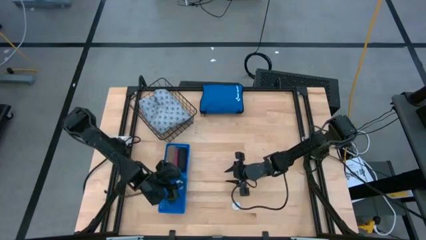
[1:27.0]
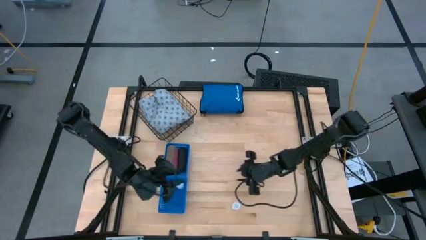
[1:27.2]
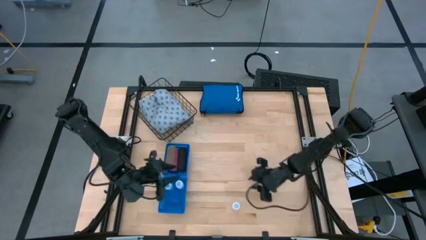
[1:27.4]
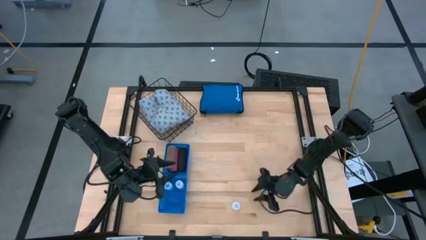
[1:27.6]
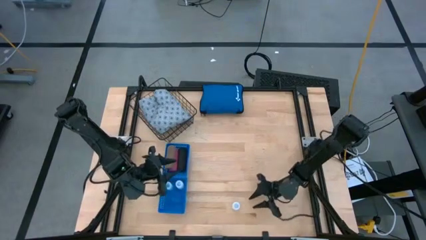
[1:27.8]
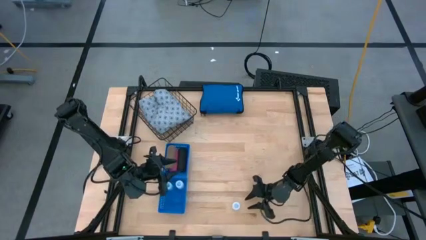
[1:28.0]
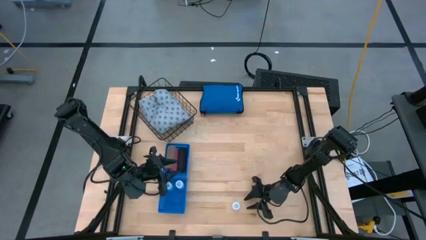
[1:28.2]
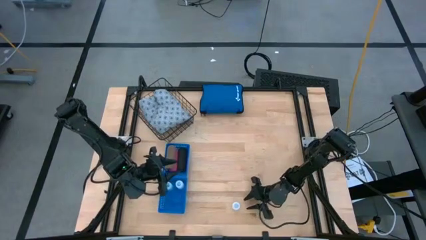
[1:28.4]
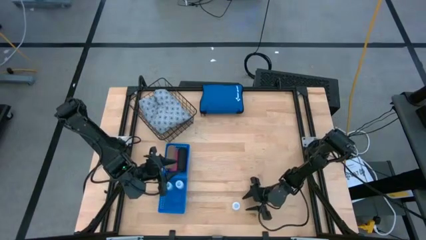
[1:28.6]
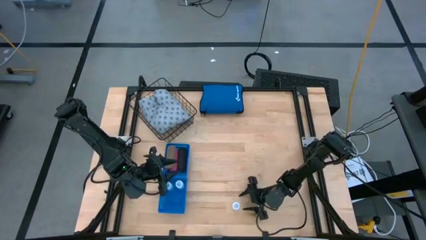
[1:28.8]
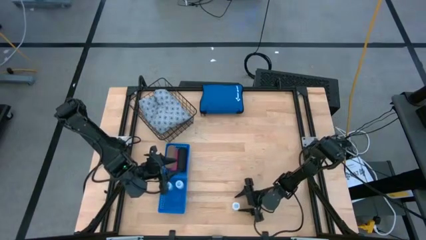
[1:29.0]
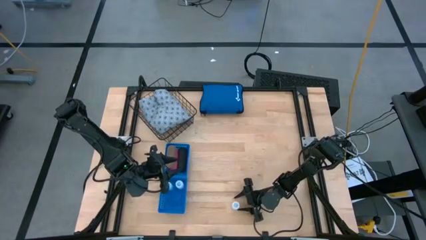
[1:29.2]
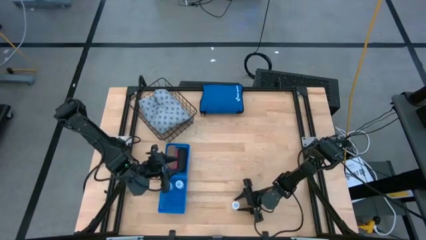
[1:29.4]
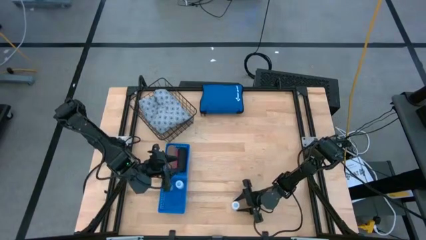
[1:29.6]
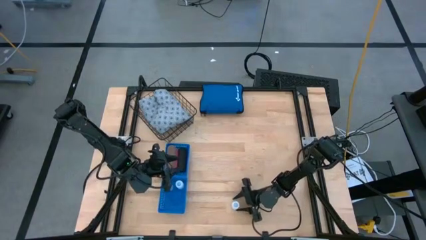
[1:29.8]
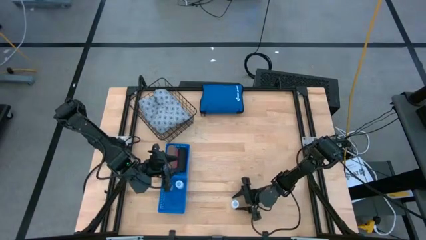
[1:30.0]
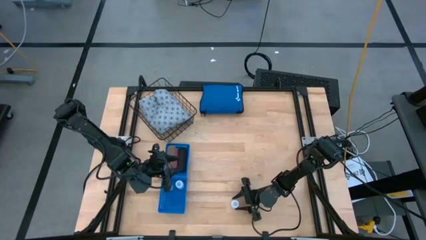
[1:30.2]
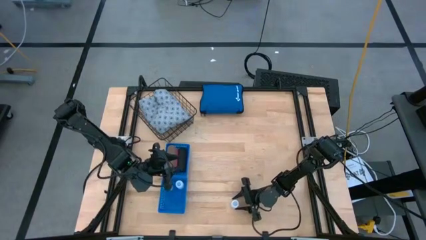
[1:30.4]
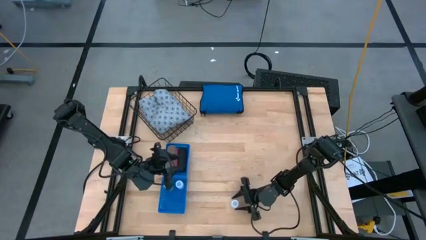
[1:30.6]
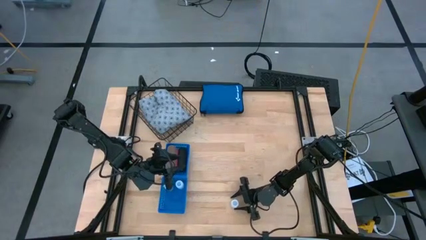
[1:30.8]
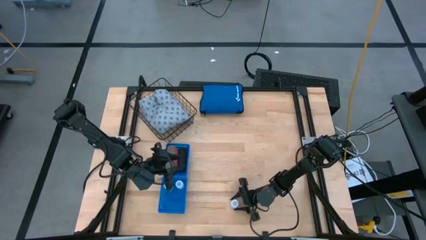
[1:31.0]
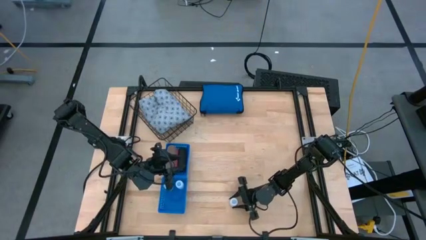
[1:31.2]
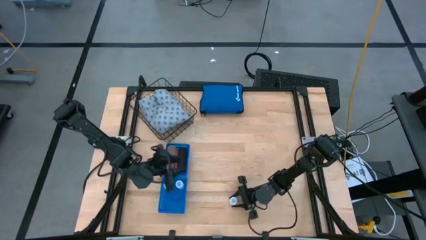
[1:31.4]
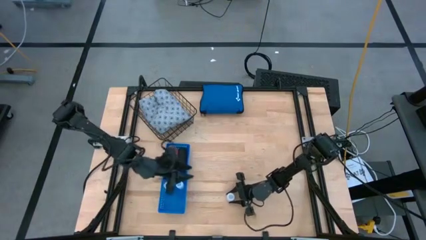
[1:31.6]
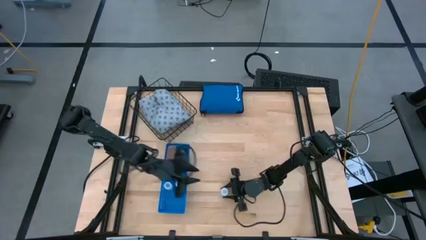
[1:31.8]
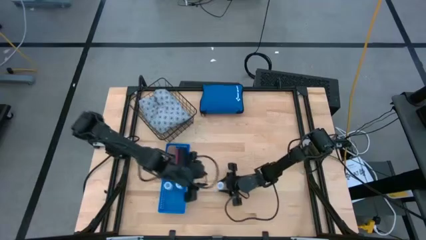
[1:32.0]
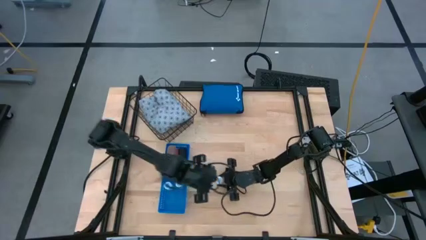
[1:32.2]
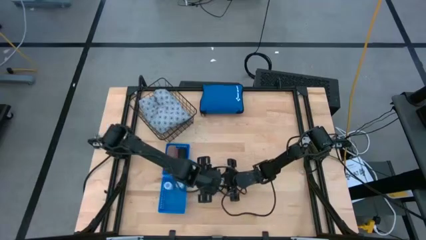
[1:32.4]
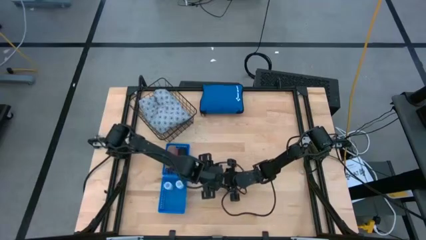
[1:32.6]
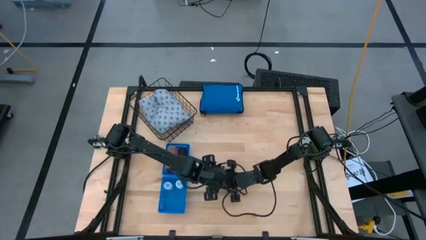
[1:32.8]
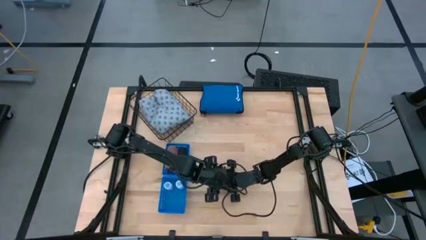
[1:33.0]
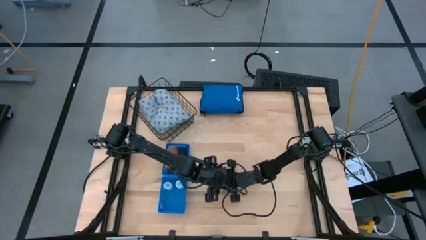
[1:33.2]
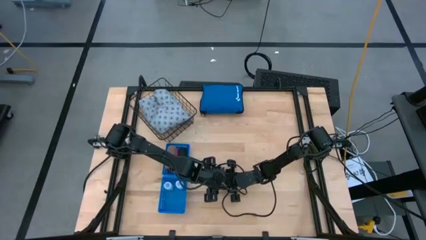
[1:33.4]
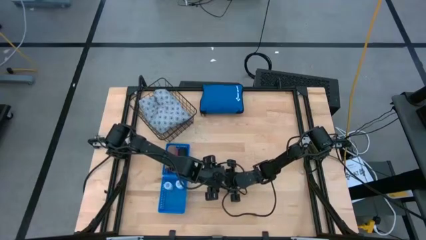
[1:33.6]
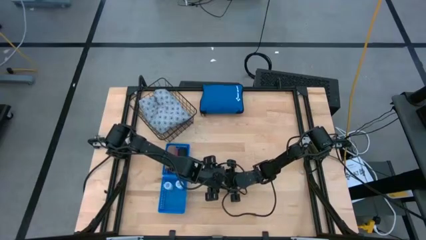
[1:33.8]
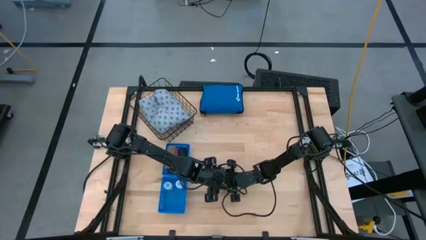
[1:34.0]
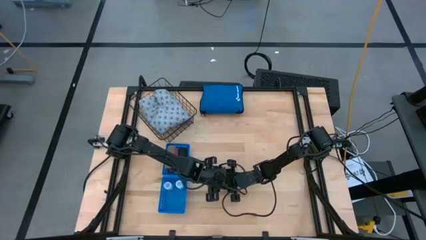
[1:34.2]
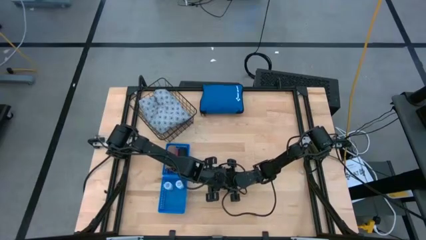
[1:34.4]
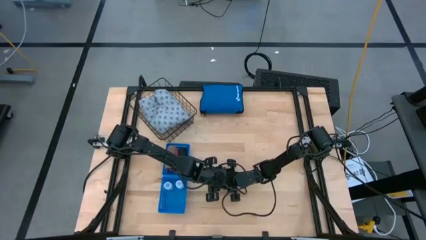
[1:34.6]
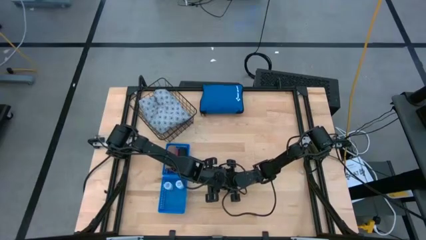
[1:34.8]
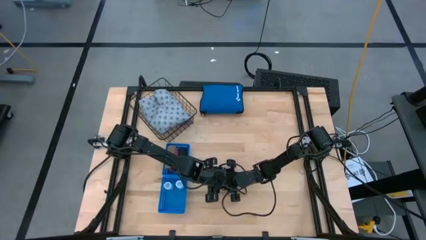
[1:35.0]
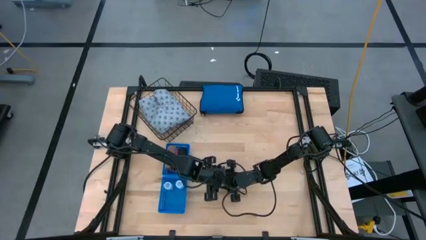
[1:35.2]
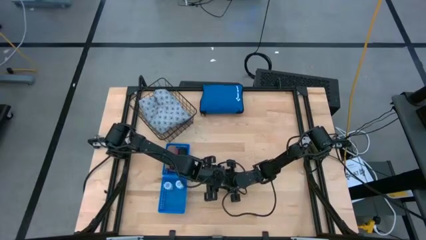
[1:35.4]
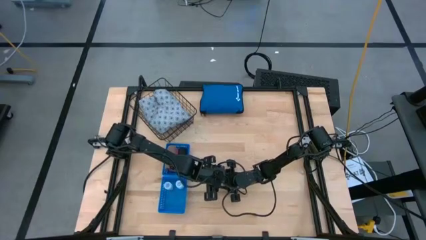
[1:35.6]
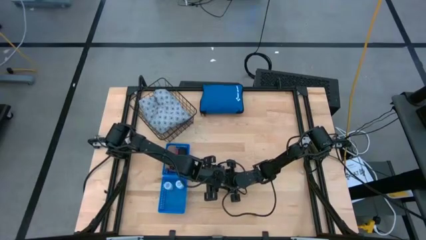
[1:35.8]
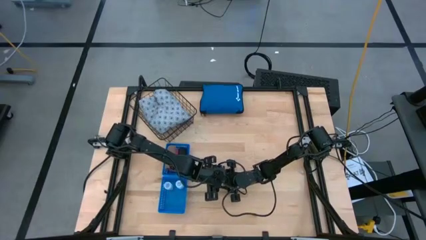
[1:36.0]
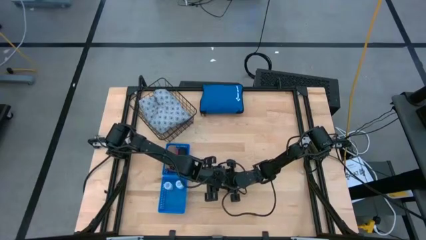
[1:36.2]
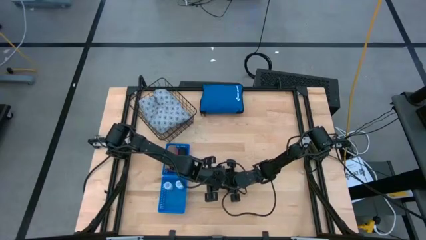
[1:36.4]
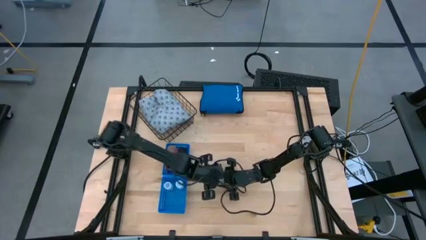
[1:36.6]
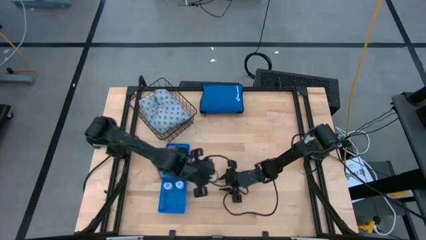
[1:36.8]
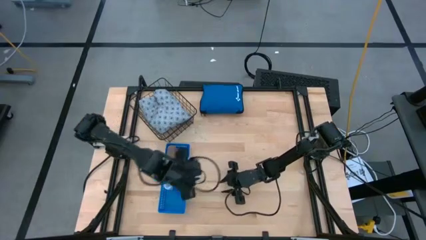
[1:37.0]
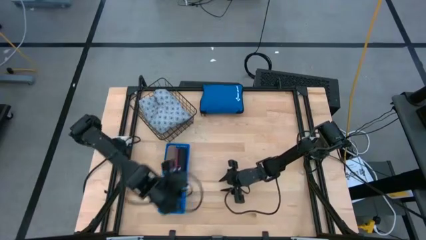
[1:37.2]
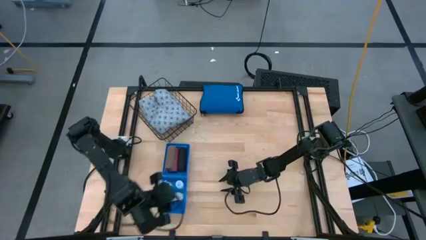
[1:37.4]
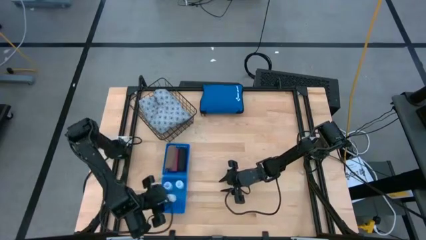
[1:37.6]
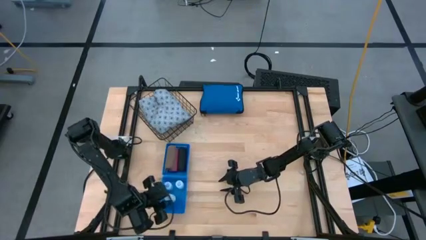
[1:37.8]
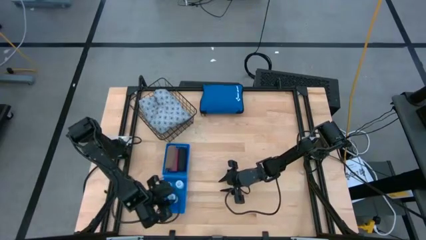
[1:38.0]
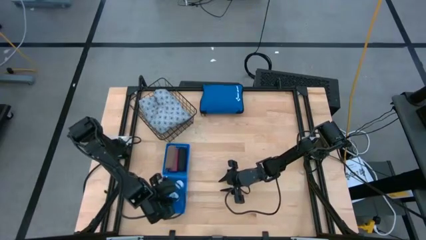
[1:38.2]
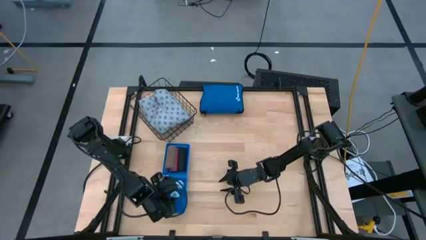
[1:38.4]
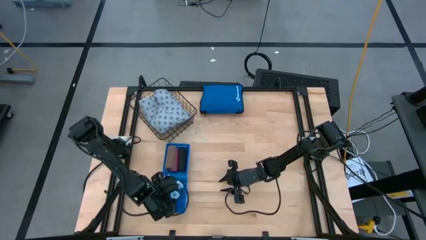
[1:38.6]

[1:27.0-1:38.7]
Task: Pick & place medical supplies in basket/bin
Put the white pill bottle into the bottom blue bin

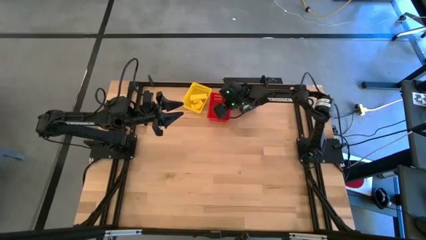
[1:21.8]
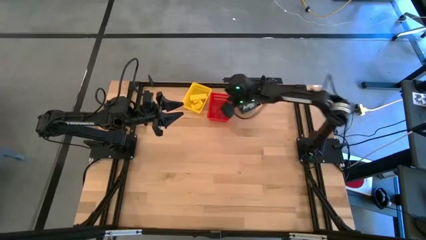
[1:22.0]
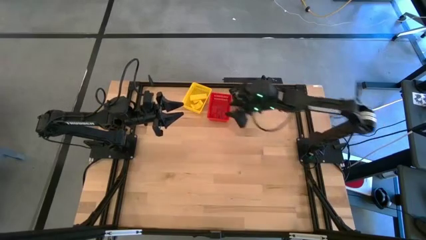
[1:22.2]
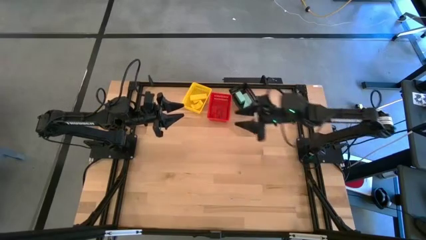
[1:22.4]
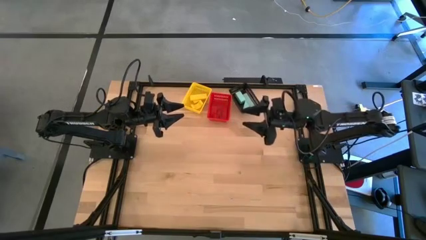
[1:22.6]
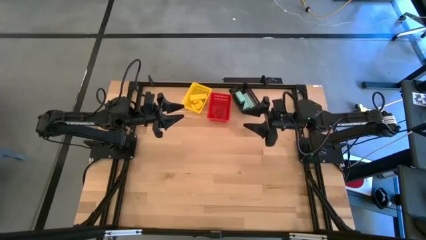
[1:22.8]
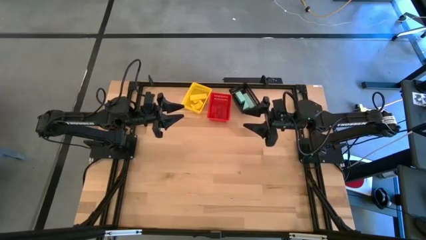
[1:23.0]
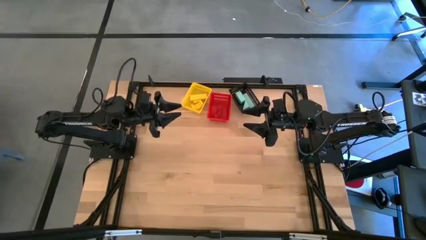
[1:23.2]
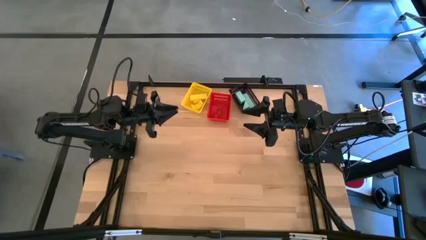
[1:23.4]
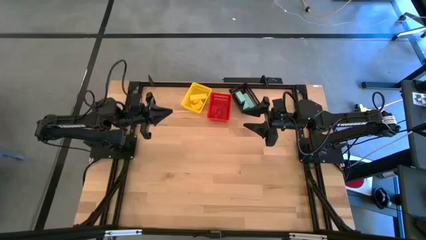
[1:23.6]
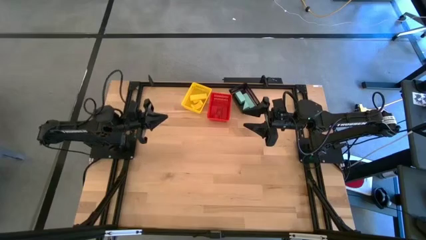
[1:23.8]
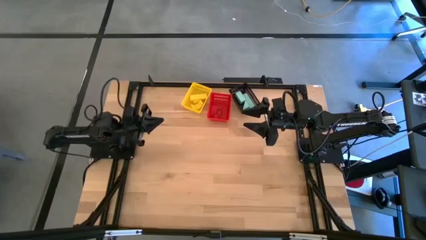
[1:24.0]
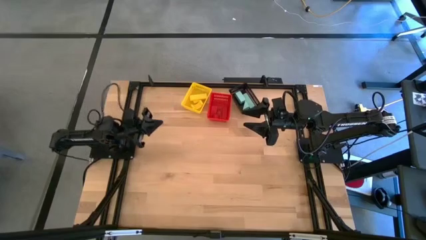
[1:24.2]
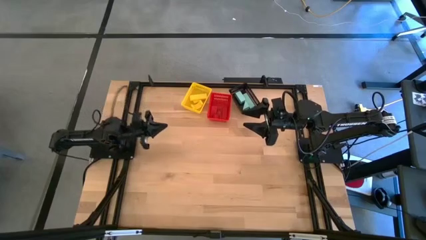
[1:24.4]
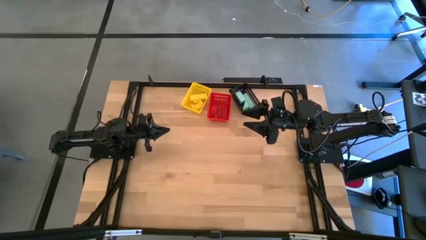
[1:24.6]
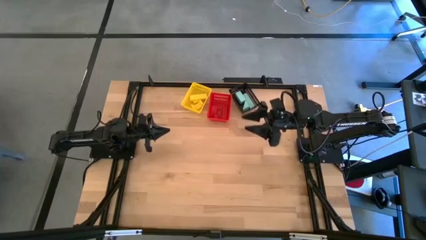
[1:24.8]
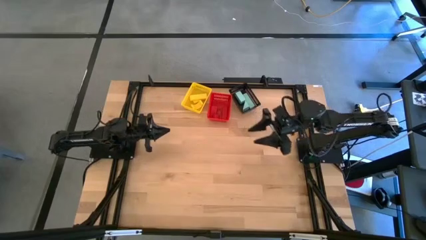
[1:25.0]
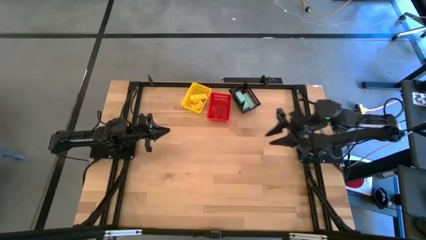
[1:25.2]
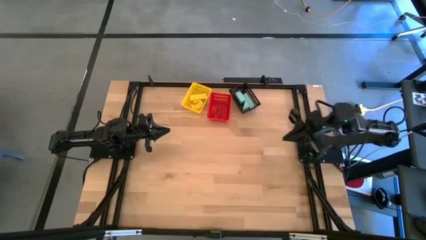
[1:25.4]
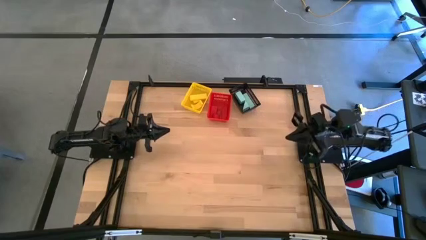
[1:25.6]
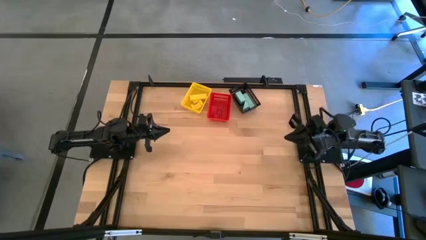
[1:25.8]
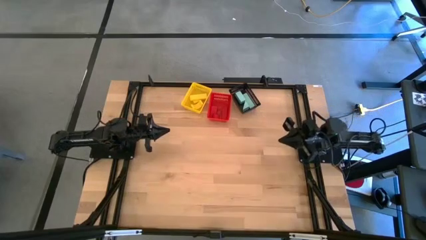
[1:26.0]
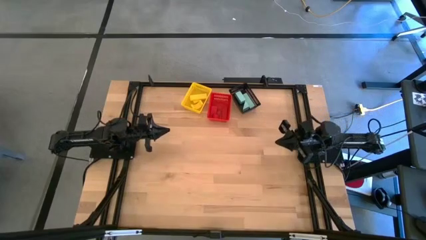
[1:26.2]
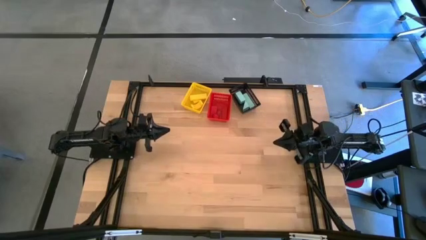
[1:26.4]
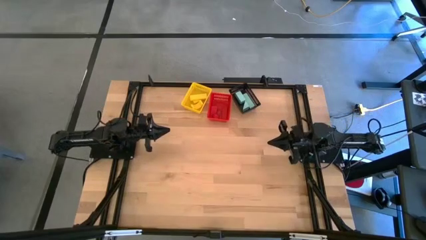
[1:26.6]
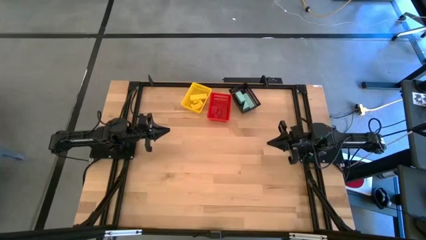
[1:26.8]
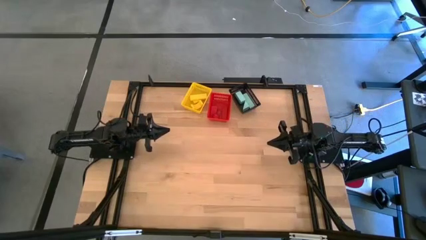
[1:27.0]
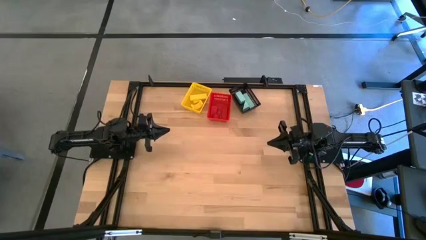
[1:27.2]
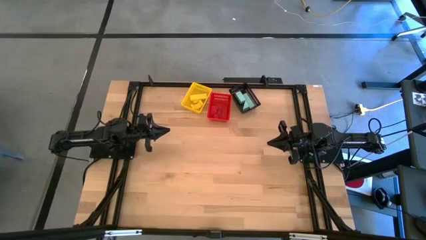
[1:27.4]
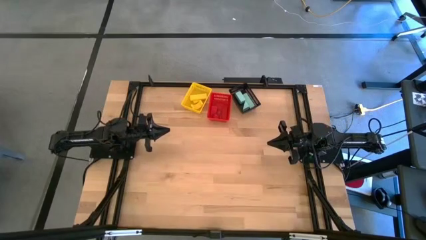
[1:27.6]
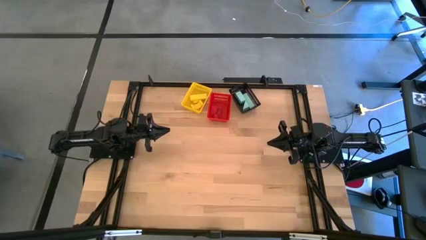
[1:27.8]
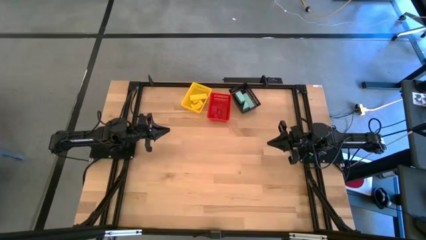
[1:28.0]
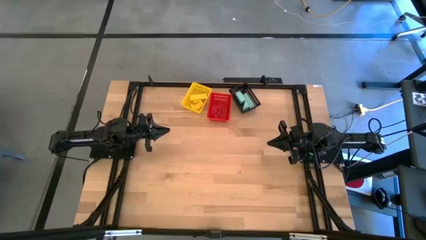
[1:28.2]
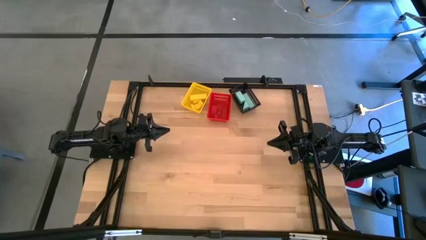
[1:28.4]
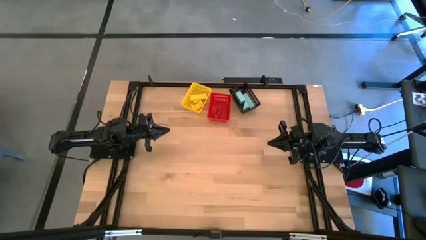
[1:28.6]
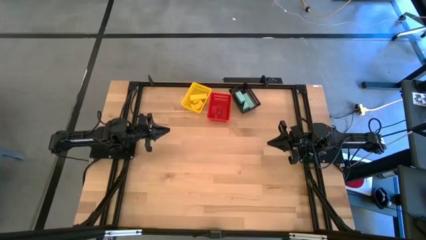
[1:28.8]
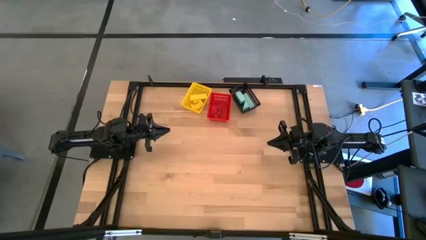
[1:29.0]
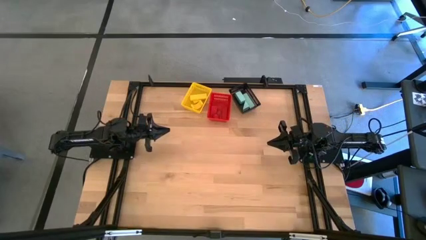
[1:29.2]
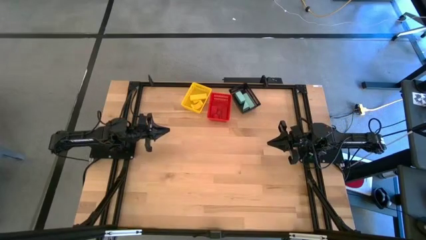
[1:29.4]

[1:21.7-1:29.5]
Task: Sort & place blocks by color
Return to Home Position
